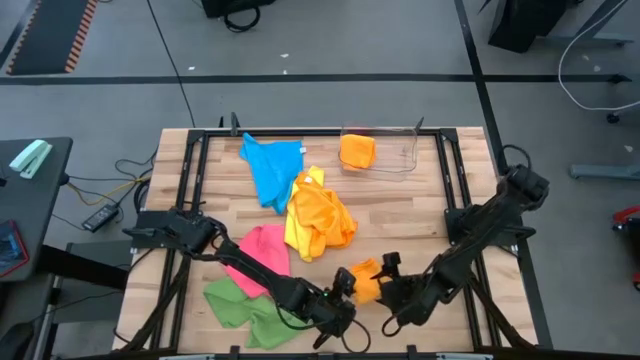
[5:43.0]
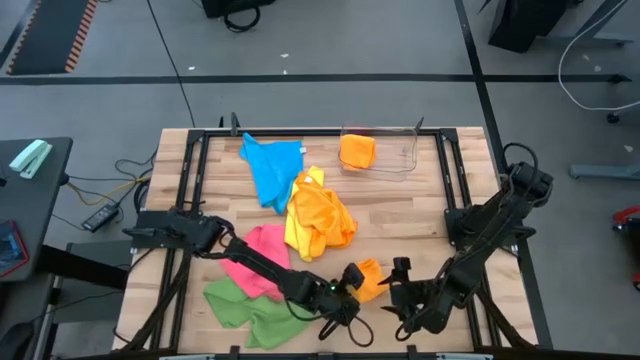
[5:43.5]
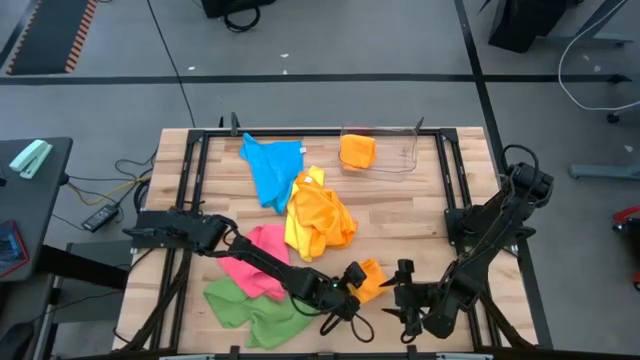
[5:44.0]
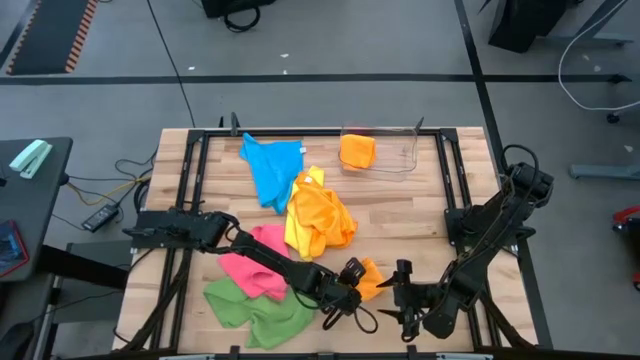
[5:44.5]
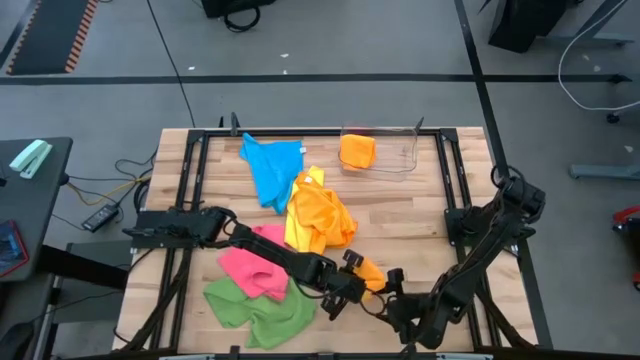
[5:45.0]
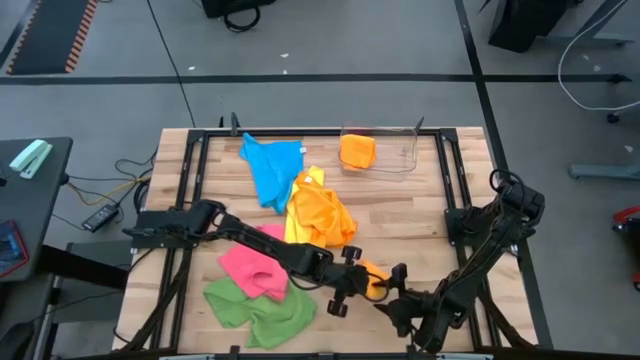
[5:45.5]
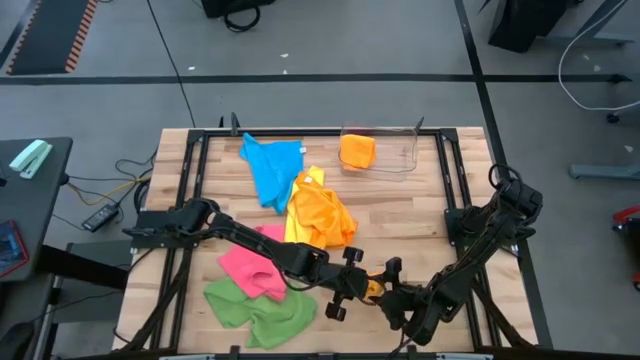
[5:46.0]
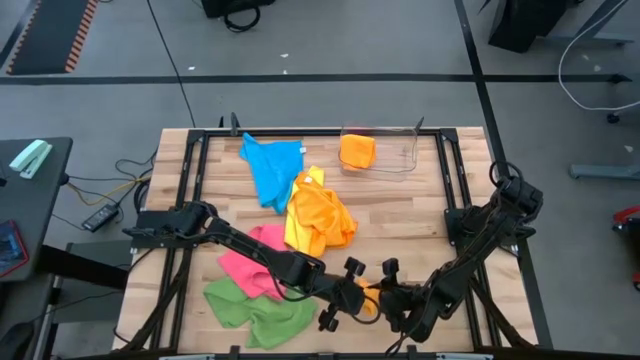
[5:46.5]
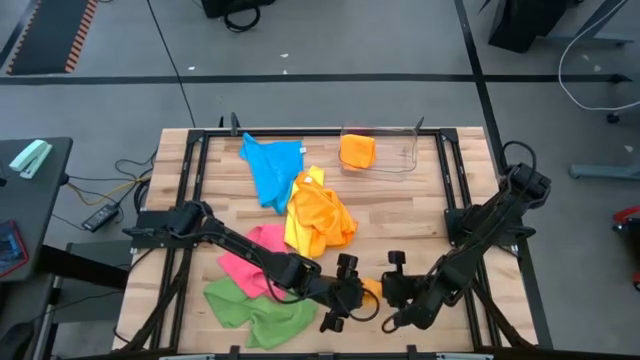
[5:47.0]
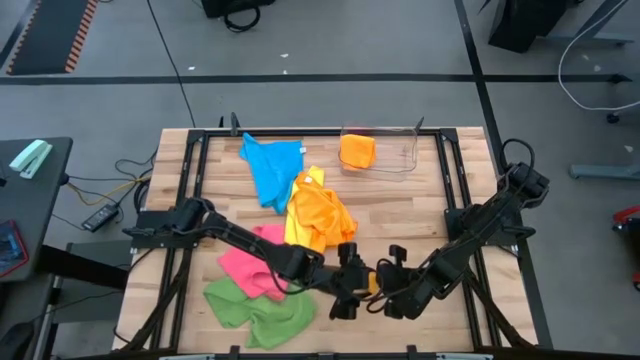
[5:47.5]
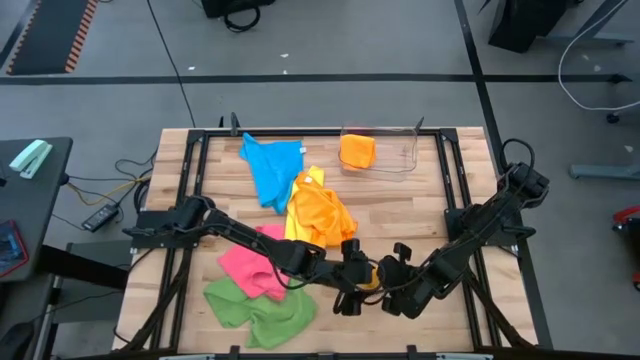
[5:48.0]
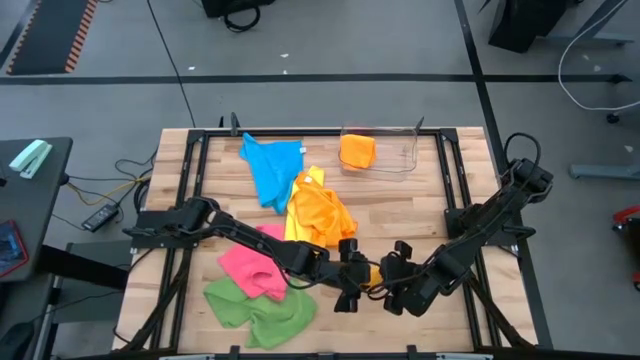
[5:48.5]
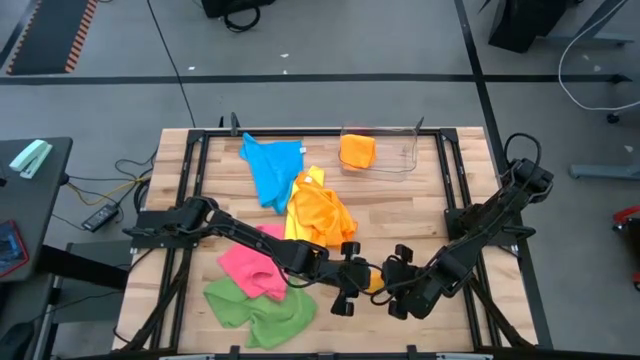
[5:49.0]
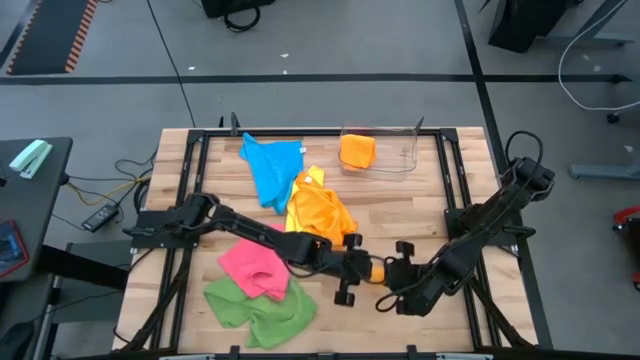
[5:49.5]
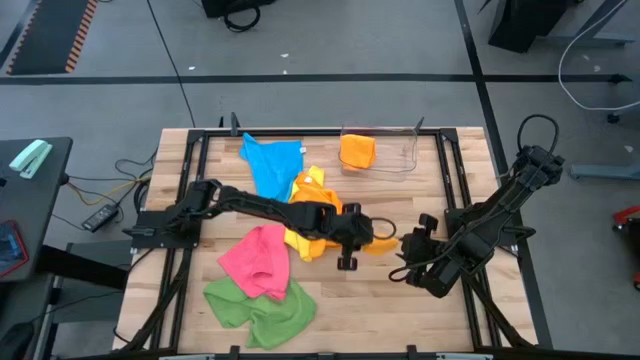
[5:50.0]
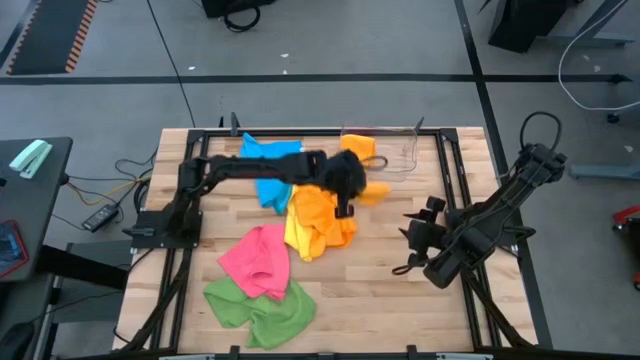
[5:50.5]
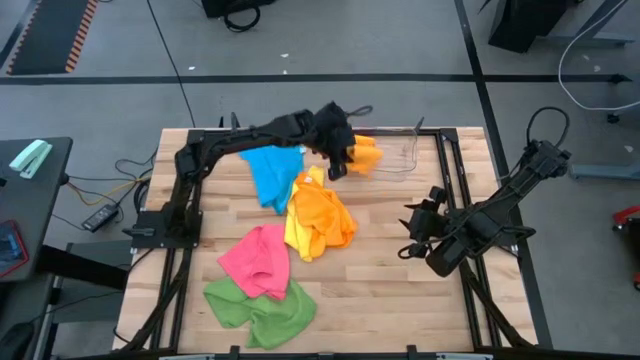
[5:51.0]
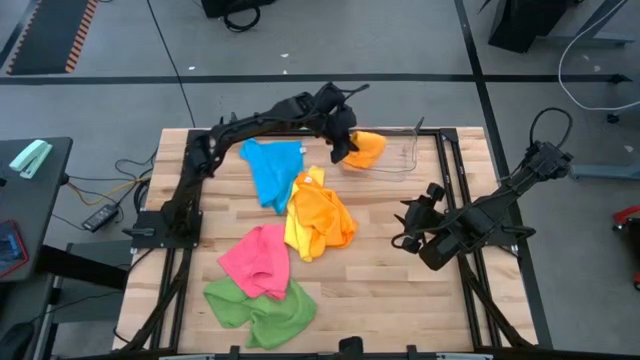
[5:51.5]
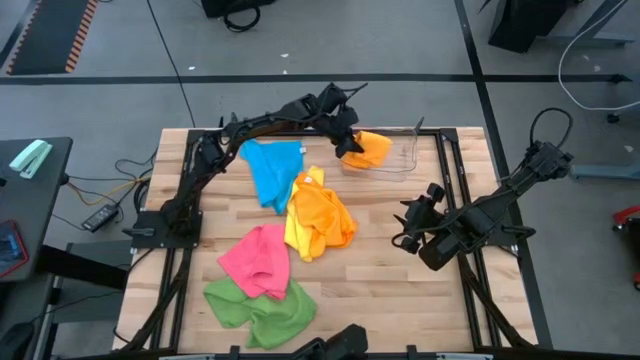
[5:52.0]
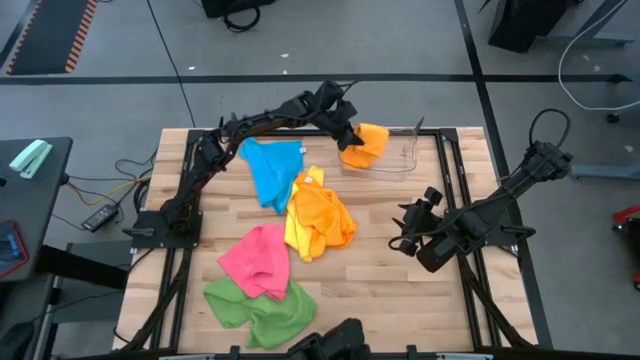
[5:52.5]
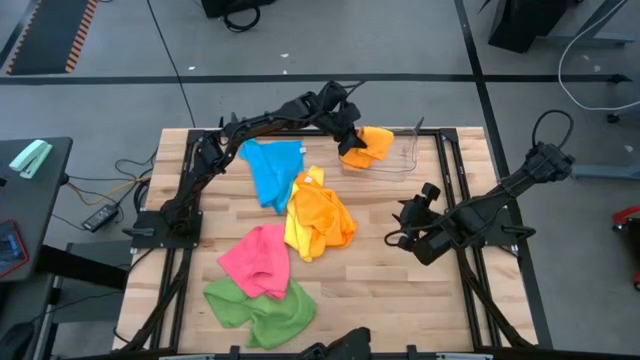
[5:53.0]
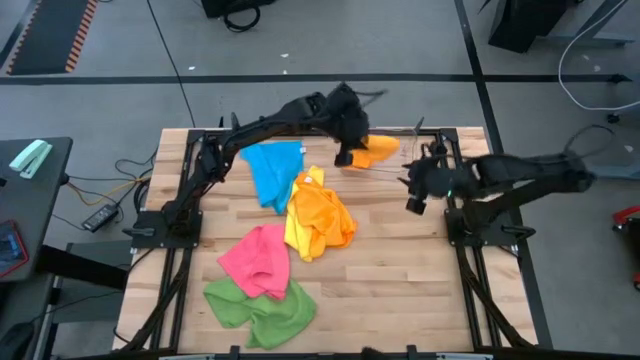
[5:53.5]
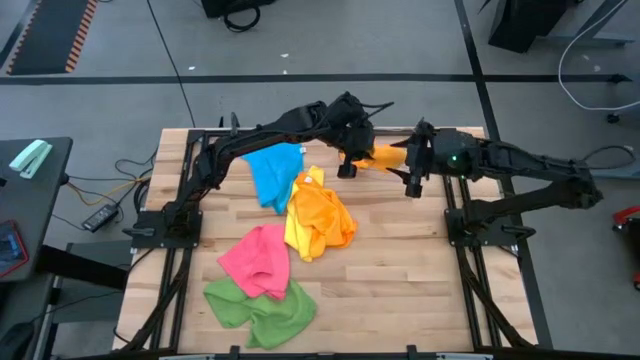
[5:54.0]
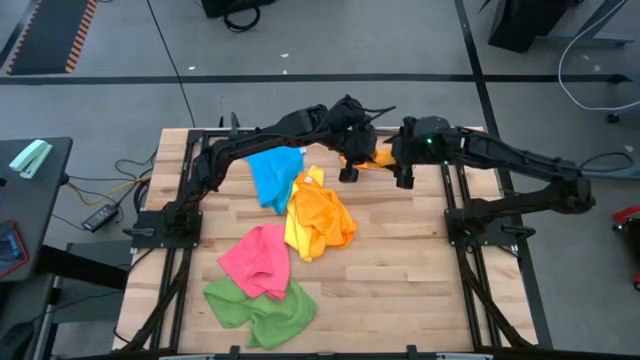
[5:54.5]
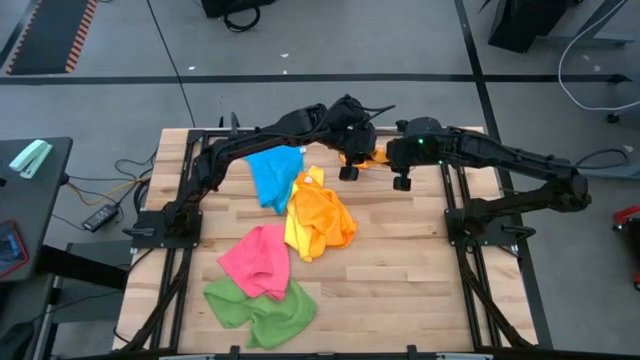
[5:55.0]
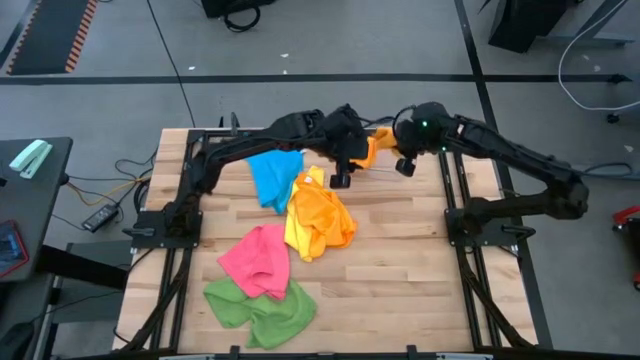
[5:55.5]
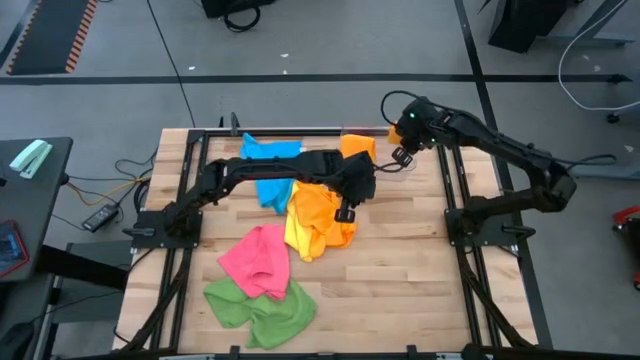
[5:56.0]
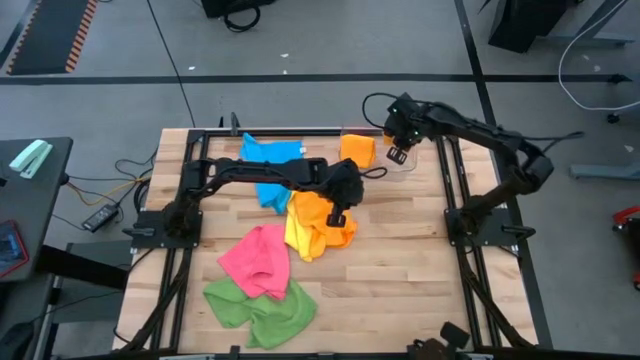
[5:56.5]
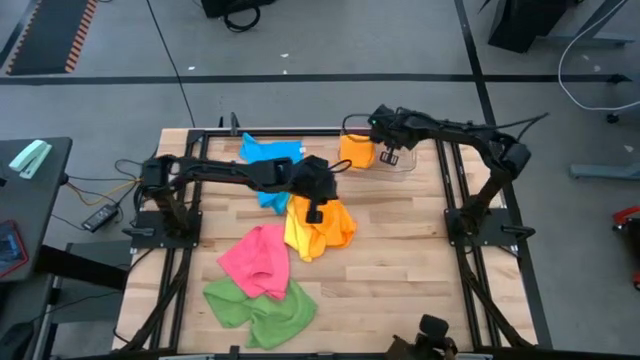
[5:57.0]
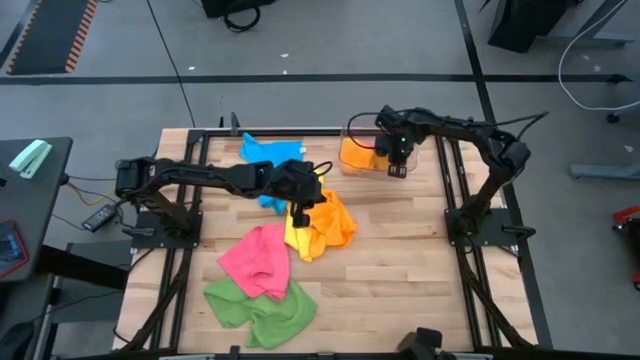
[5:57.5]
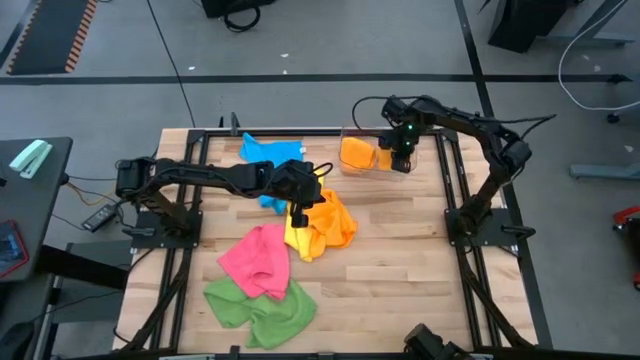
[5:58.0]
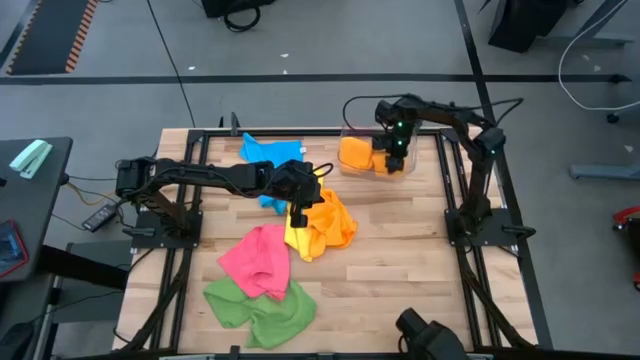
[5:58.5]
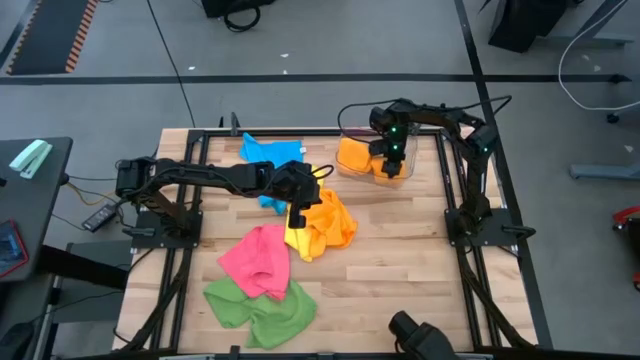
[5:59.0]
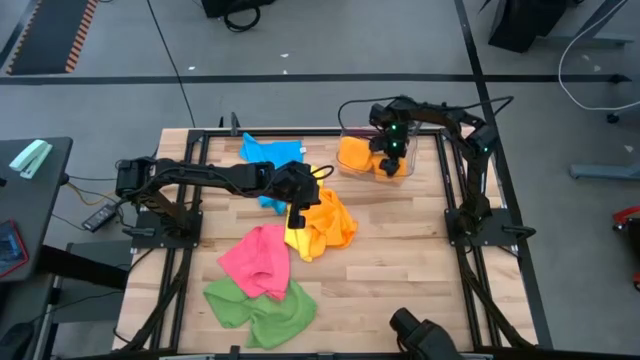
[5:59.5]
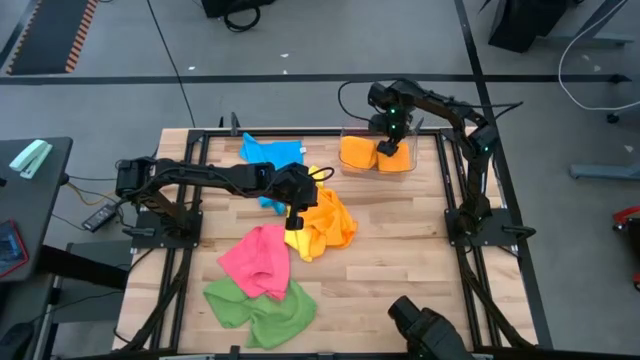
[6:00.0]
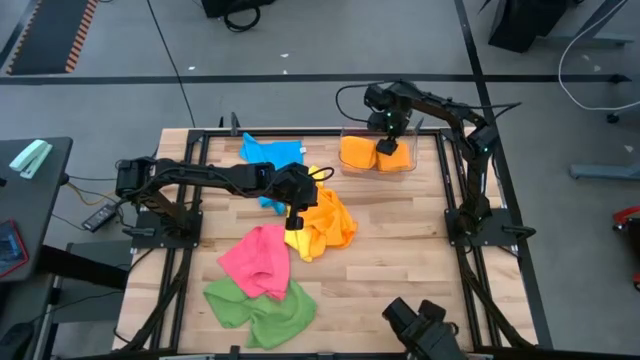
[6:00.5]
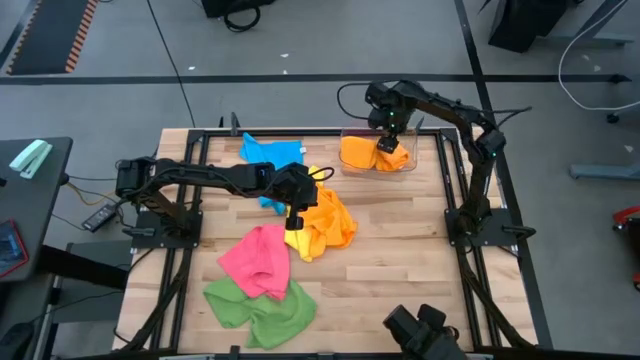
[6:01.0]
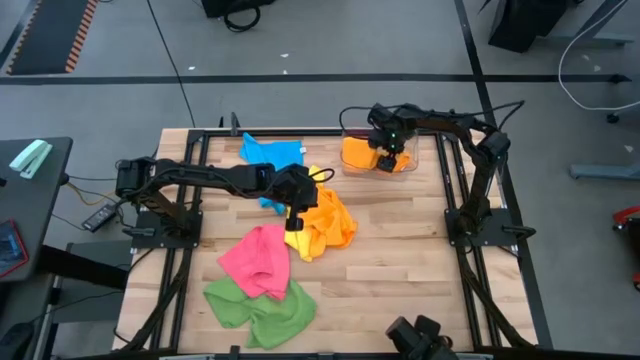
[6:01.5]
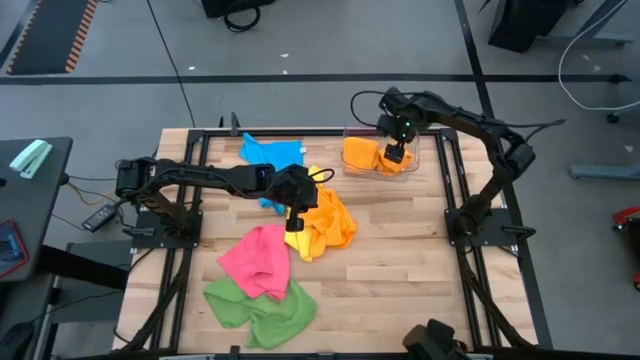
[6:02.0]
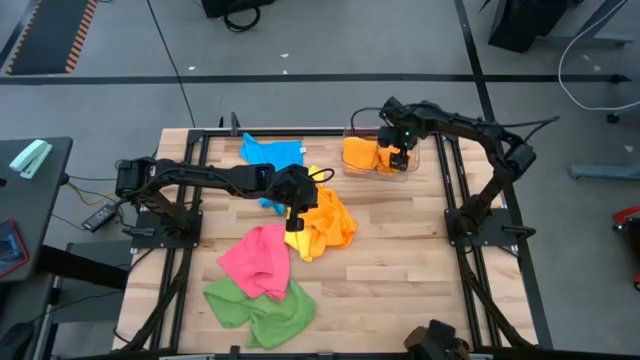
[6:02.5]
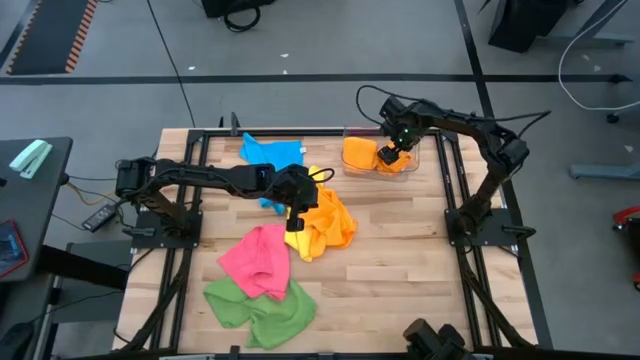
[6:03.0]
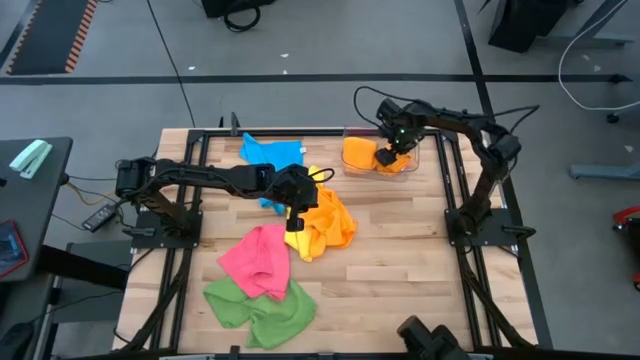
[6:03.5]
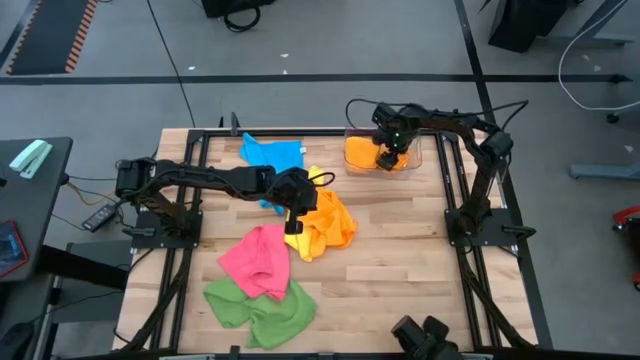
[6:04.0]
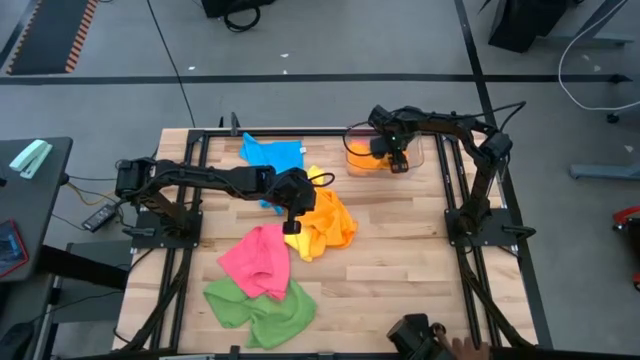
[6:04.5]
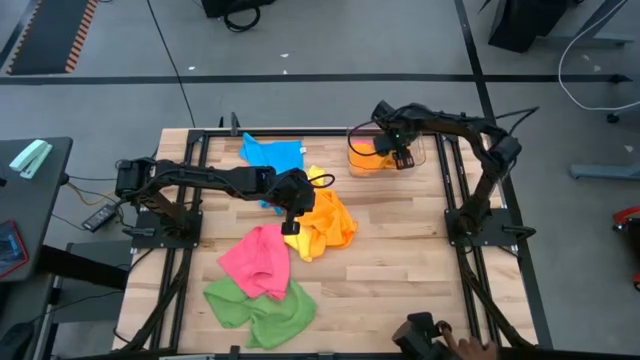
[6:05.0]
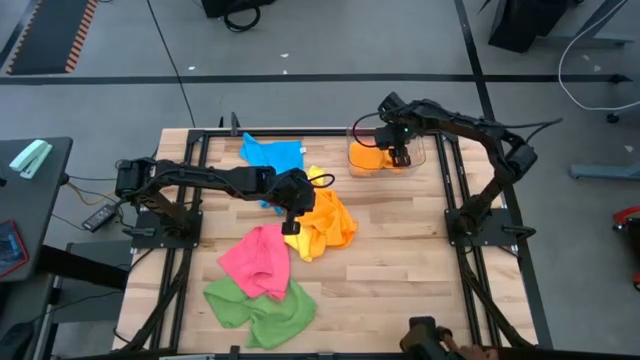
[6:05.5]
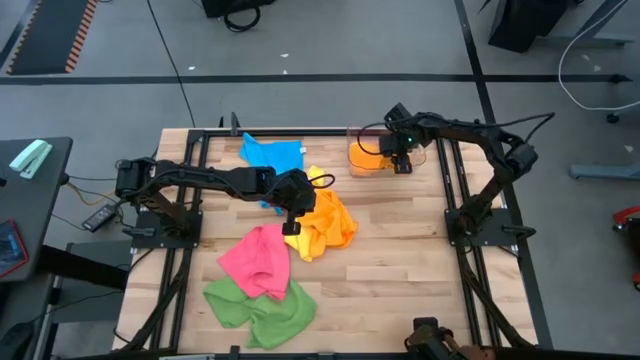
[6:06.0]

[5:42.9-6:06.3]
Task: Fold microfiber towels
Put the folded right orange microfiber cloth into the transparent bin
